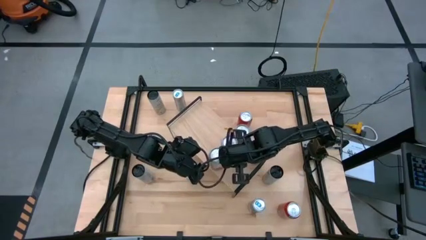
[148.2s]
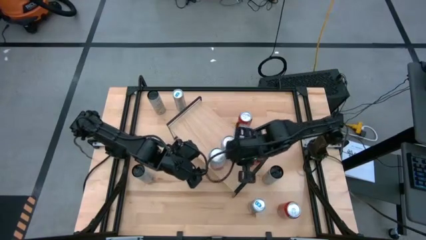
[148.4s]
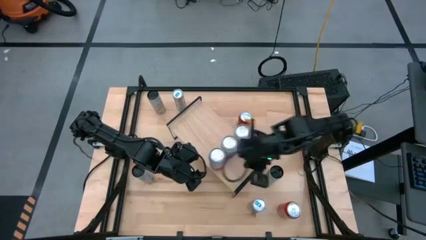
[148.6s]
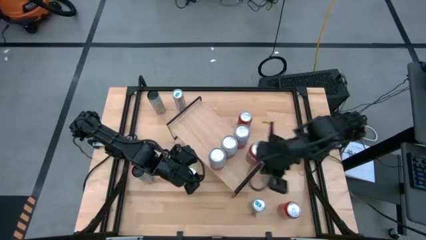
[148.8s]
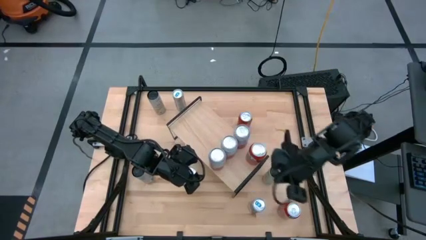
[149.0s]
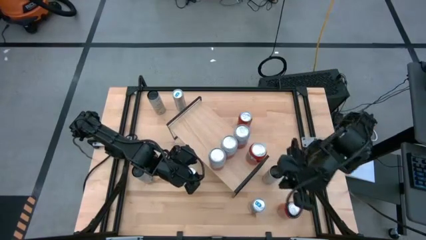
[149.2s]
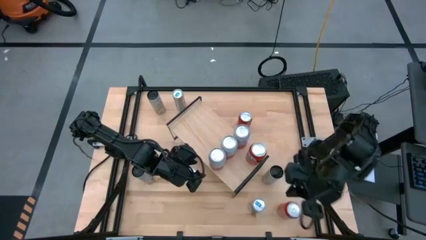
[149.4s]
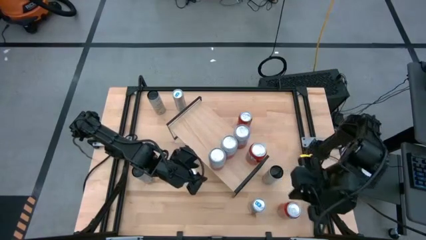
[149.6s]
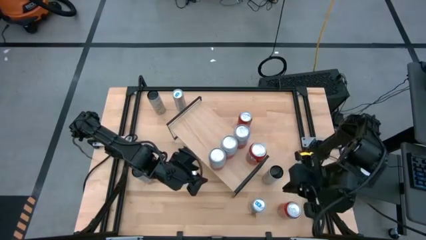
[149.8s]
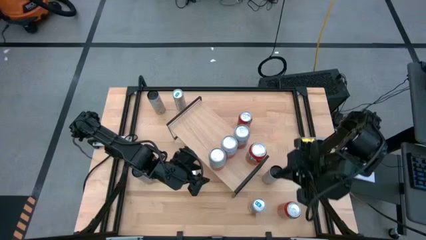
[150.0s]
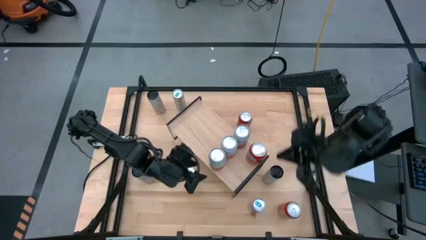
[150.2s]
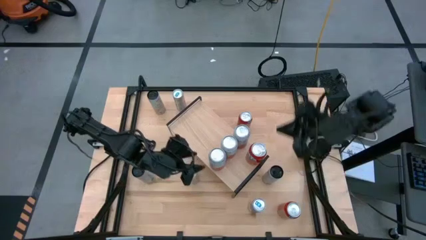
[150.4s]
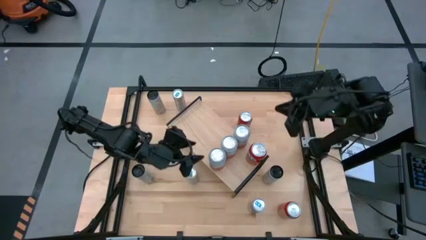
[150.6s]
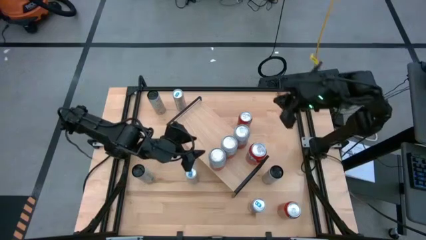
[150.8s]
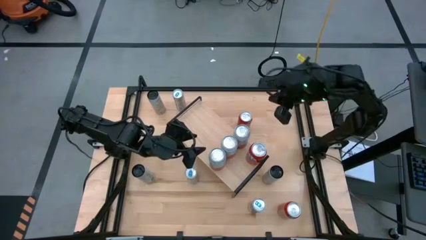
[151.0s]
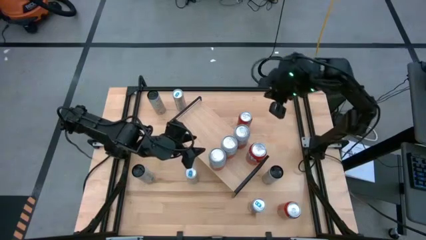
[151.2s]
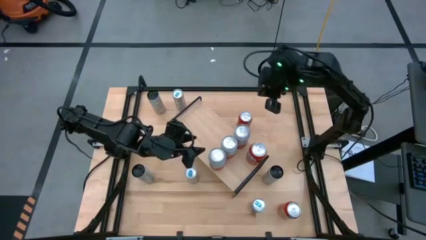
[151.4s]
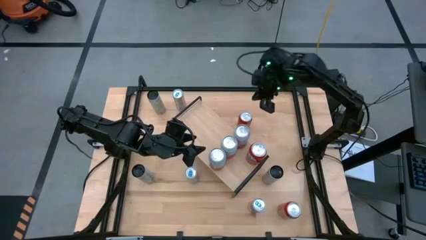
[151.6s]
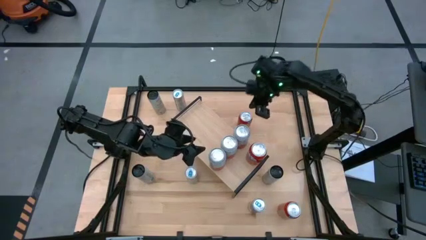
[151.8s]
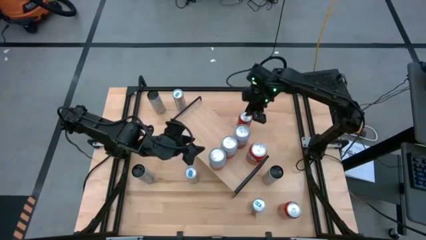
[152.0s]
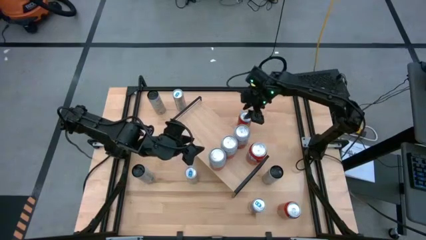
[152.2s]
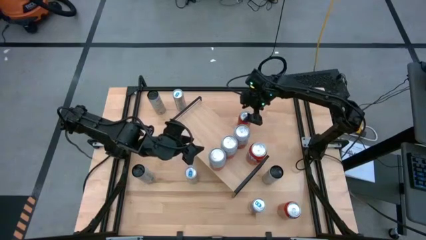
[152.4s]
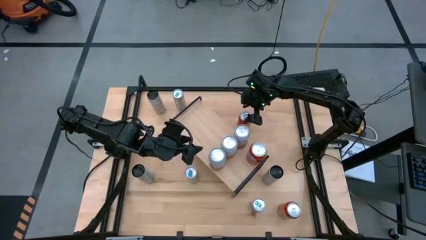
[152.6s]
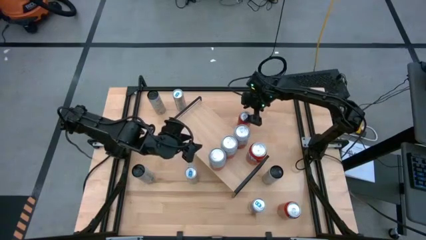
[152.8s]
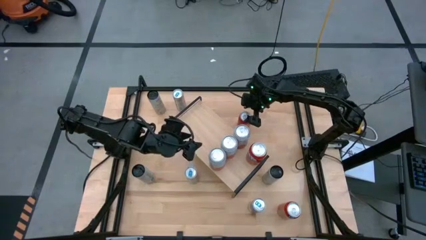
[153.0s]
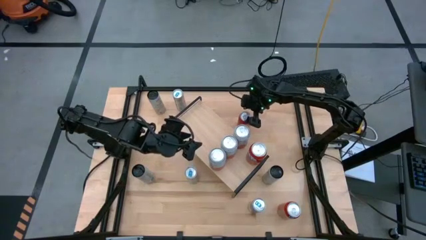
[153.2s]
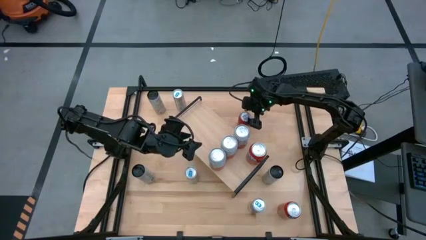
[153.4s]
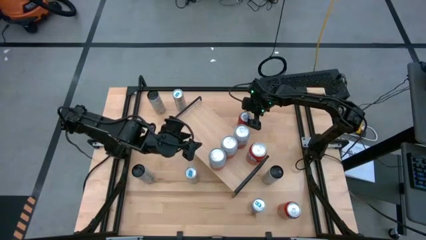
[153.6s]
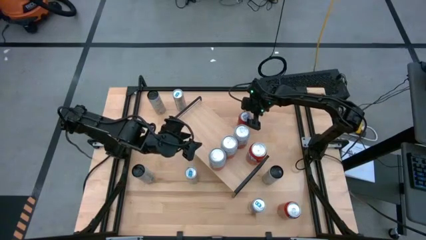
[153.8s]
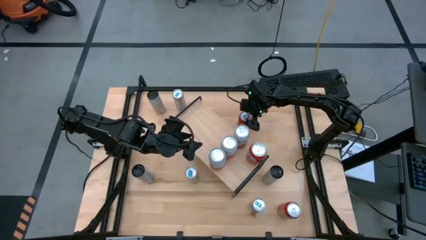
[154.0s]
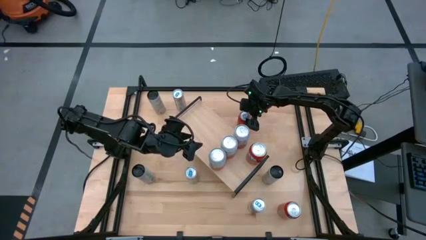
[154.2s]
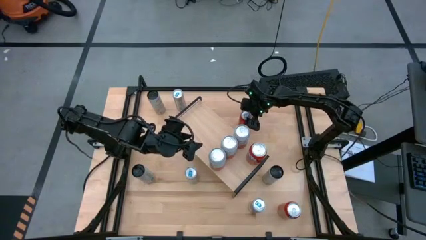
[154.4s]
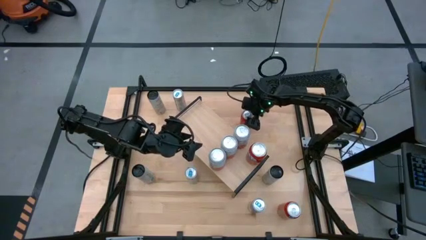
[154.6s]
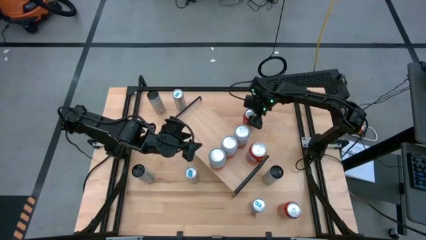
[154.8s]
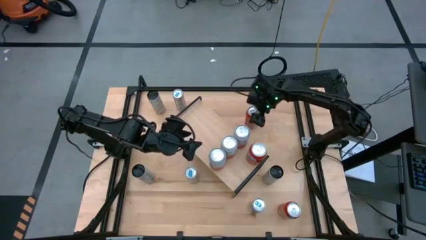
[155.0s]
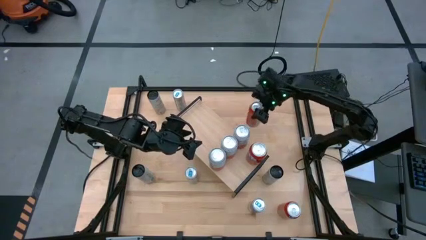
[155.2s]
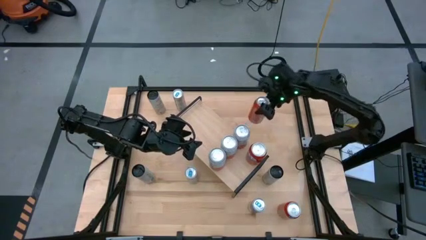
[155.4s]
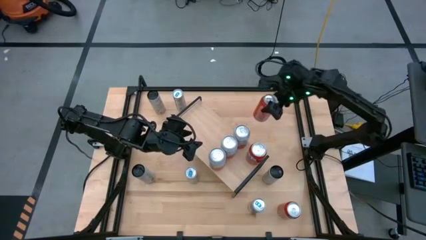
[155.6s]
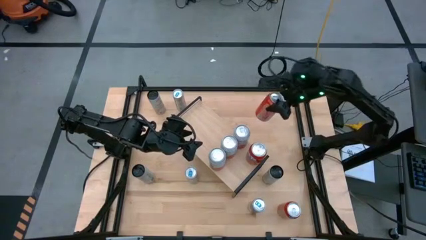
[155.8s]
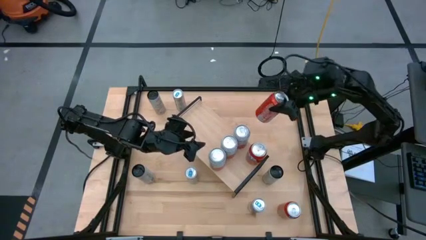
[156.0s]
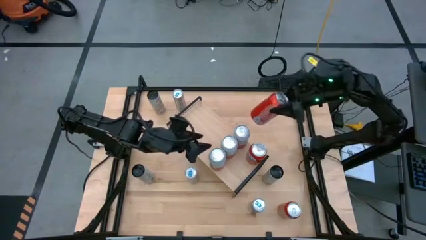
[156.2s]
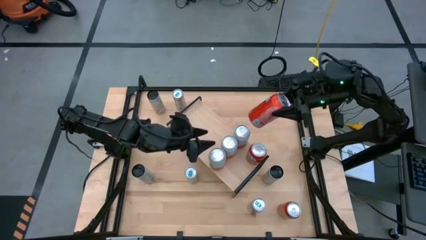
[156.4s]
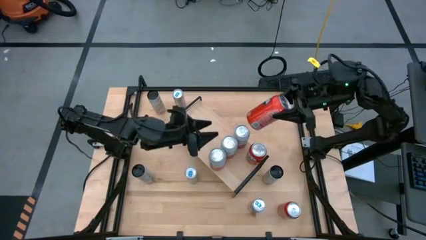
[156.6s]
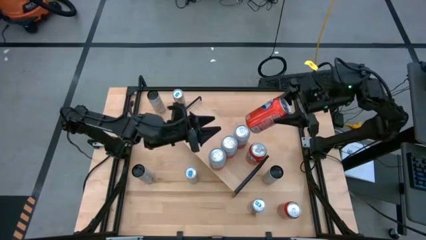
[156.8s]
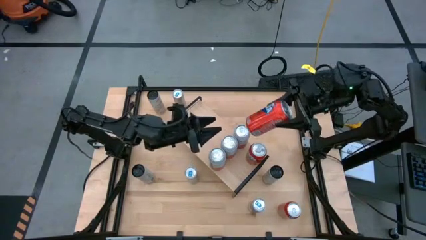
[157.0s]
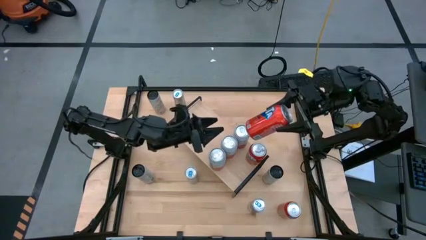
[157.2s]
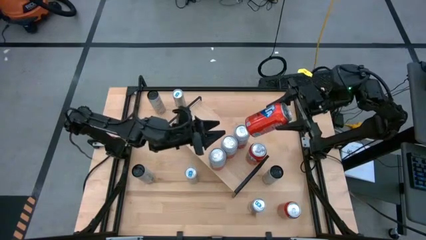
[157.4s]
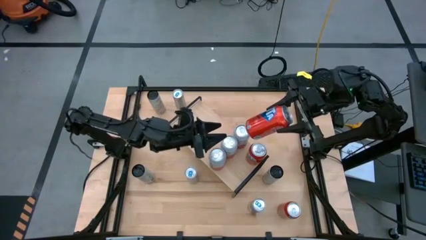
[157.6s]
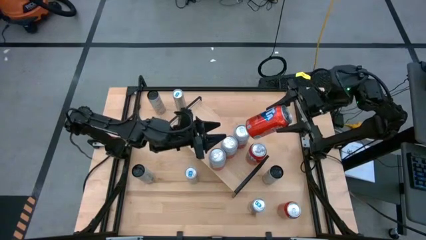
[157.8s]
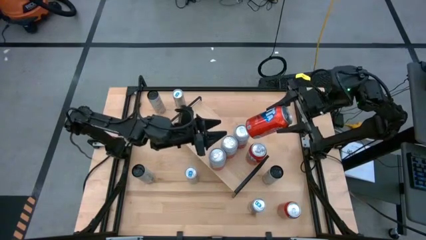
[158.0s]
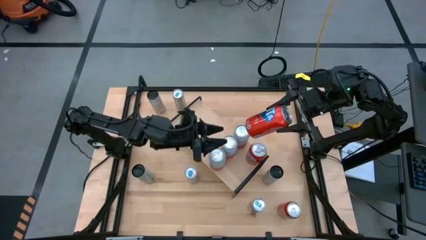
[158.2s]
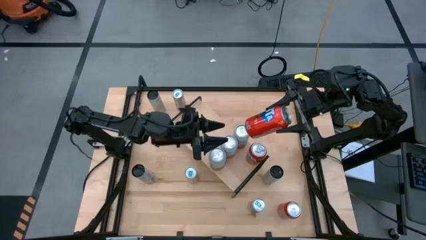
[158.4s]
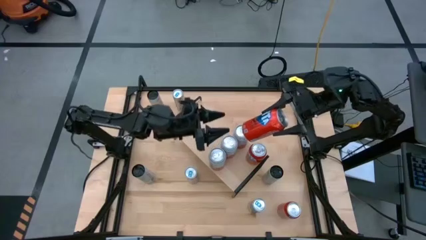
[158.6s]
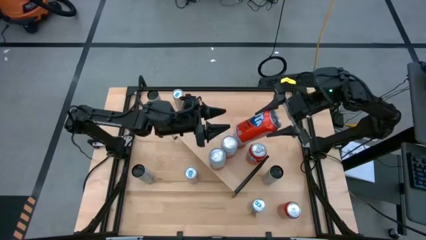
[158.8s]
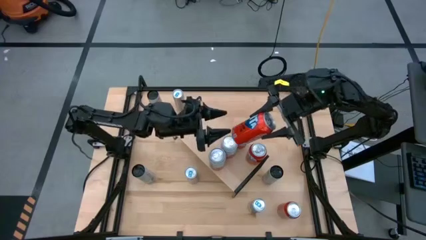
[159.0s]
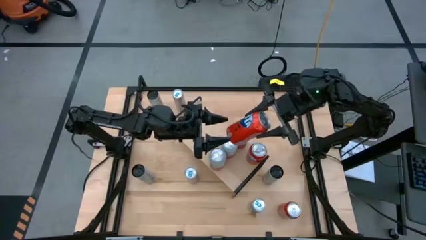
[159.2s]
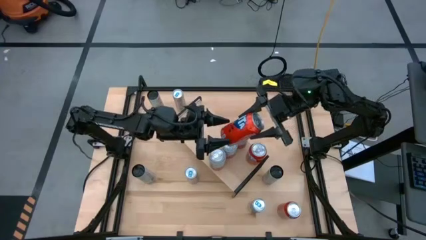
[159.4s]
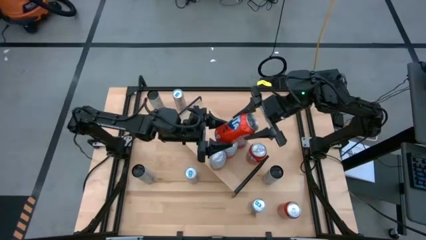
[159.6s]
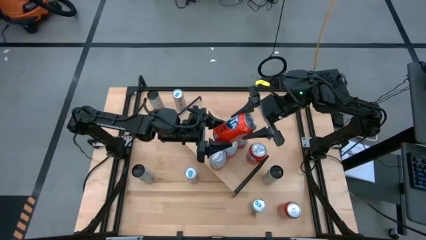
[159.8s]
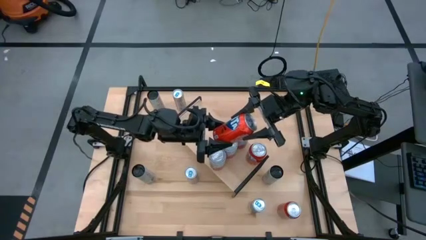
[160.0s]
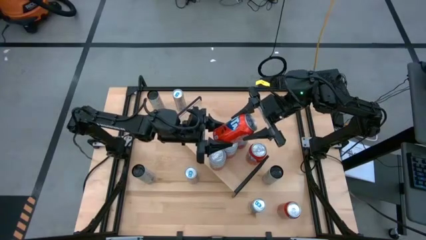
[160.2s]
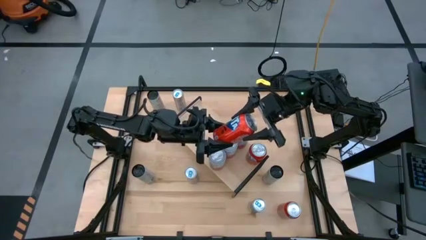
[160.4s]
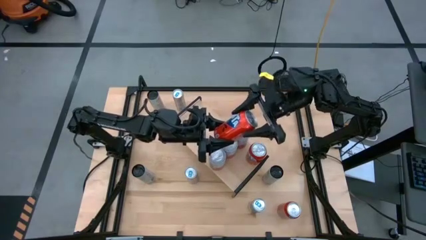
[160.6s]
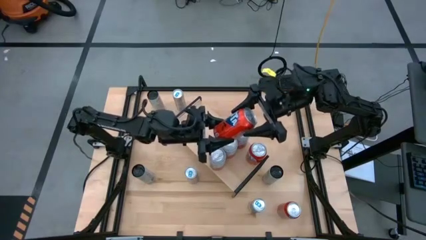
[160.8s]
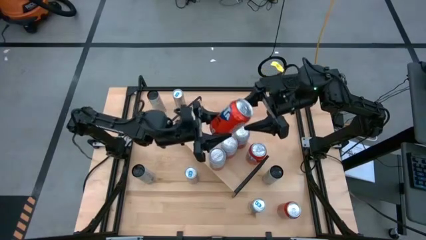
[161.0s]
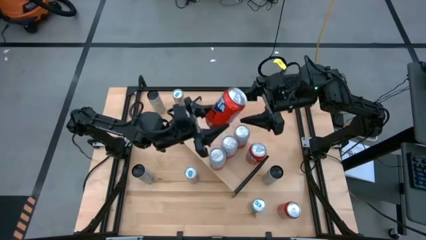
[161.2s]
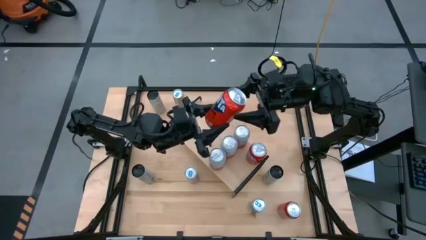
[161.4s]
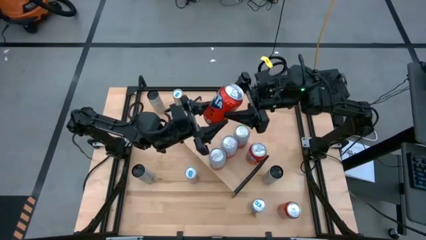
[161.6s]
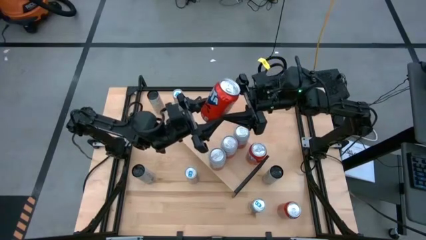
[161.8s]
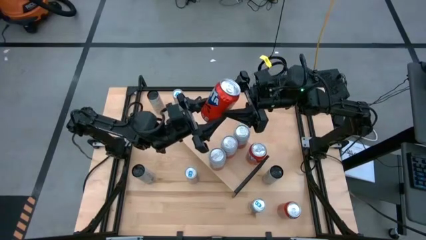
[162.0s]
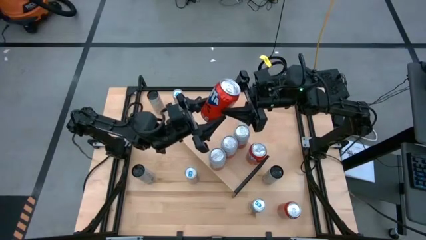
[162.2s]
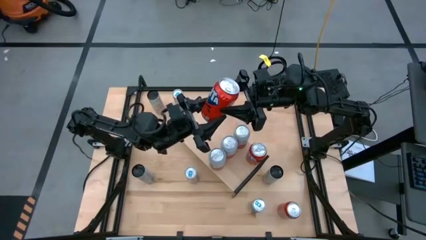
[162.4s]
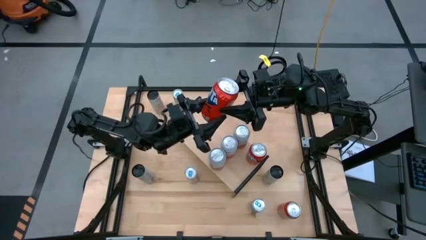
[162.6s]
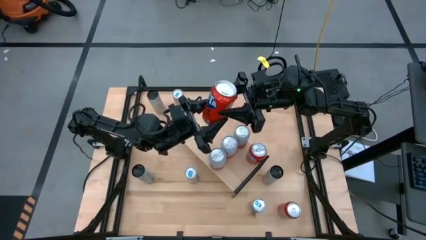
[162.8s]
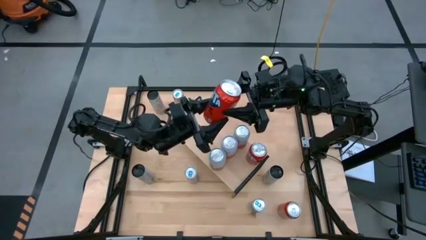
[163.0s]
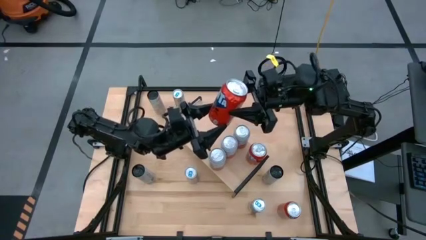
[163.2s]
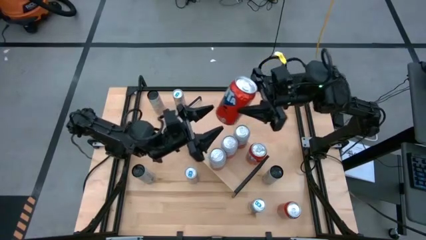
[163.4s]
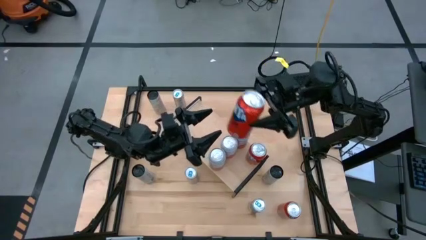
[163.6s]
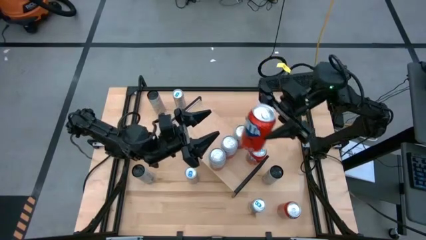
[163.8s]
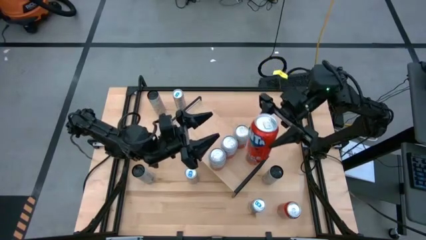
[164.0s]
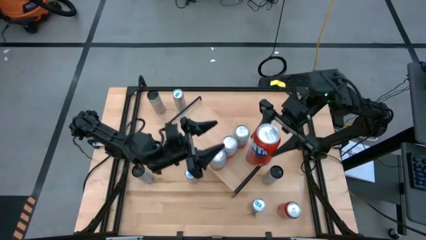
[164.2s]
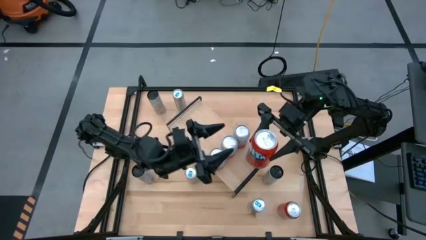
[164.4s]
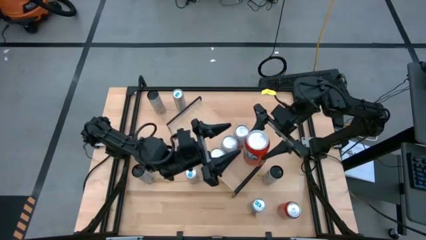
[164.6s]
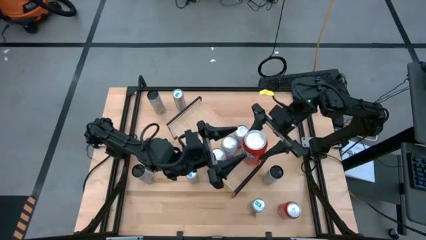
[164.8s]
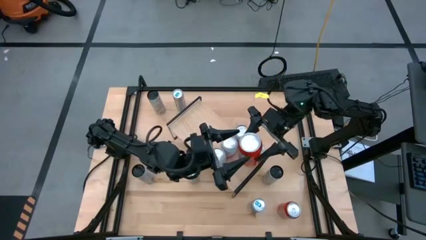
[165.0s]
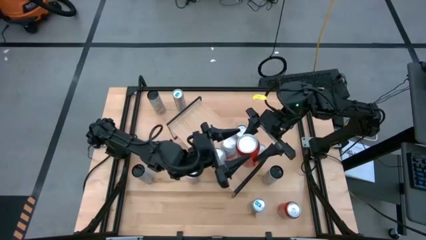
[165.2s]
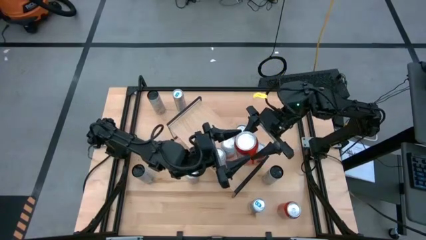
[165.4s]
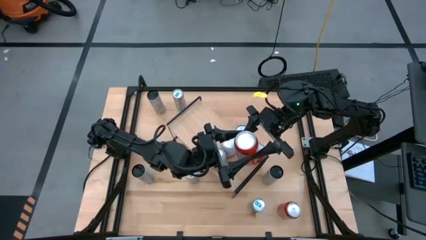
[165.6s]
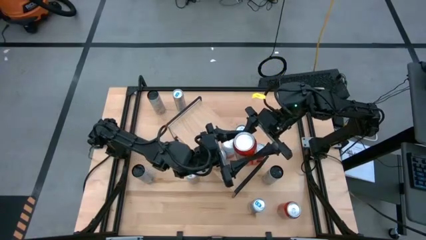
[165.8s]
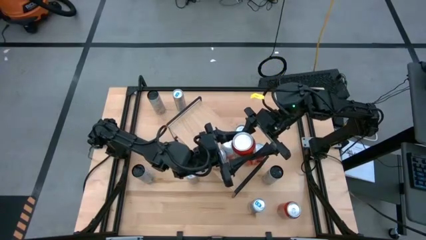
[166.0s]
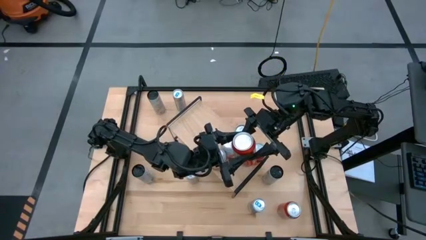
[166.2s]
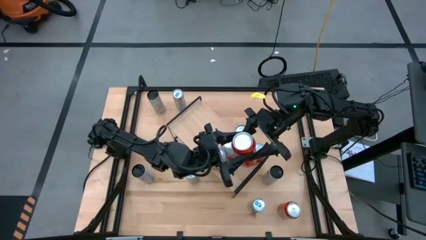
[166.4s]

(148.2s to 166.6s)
Task: Place canned beverage on shelf
Put the top red soda can on the shelf aligned with the other red soda can
